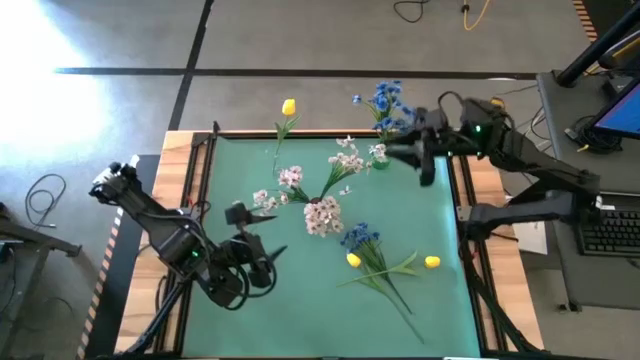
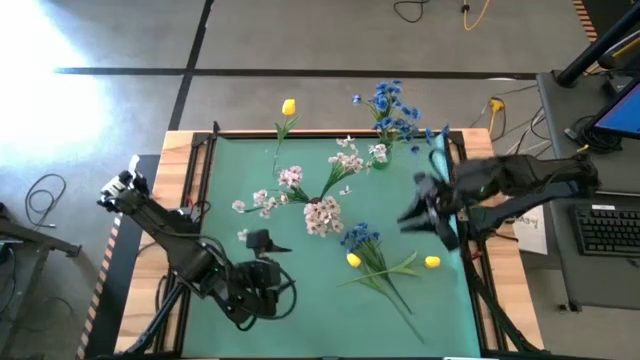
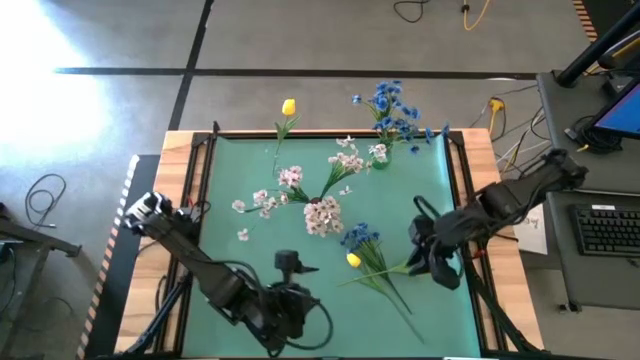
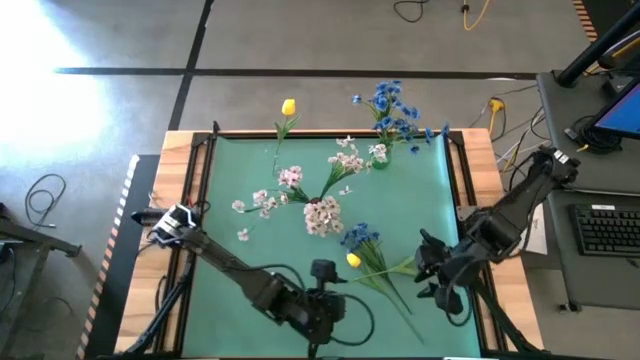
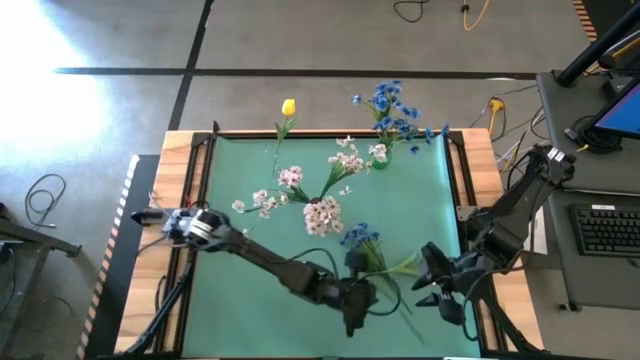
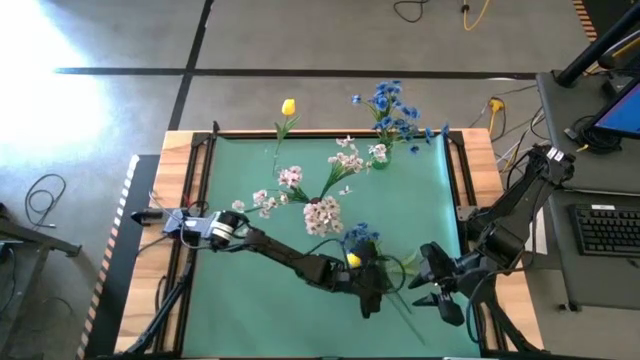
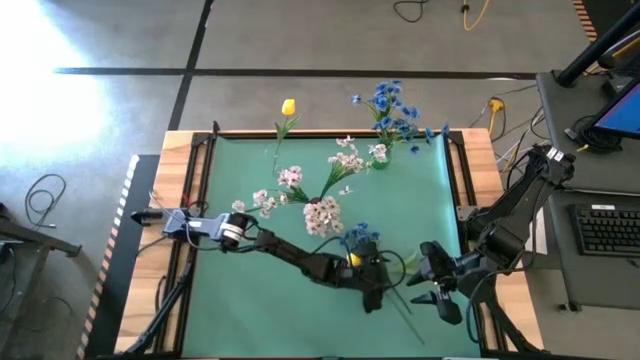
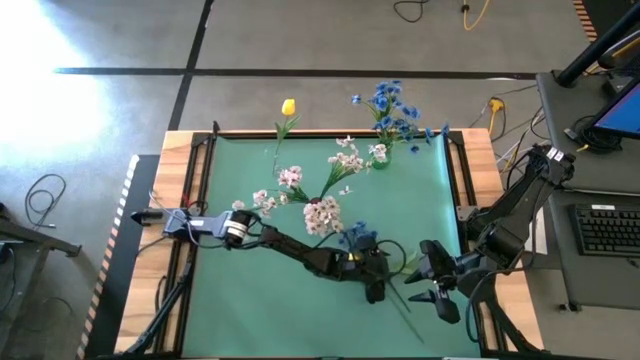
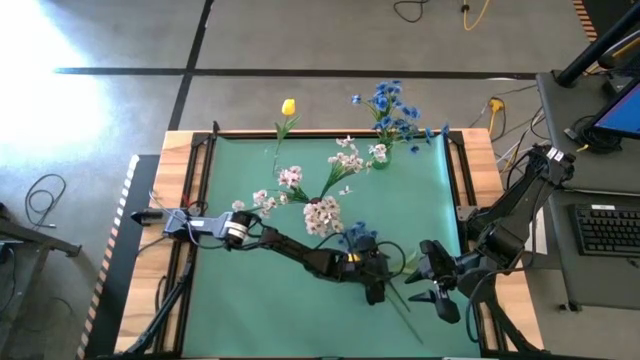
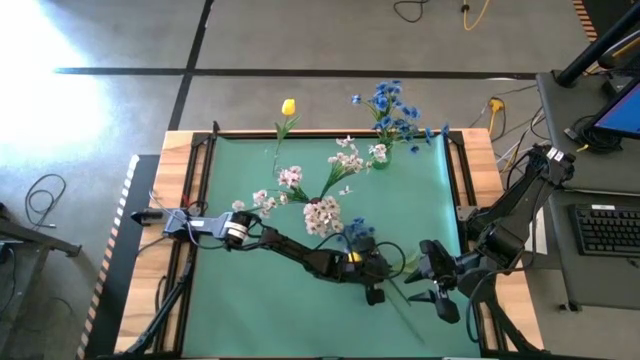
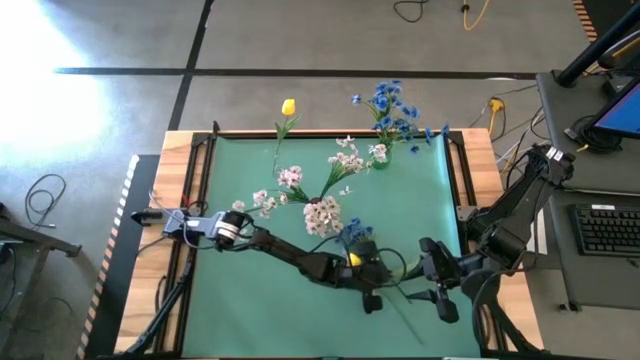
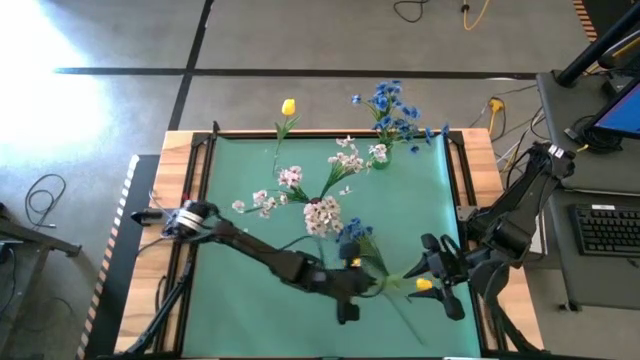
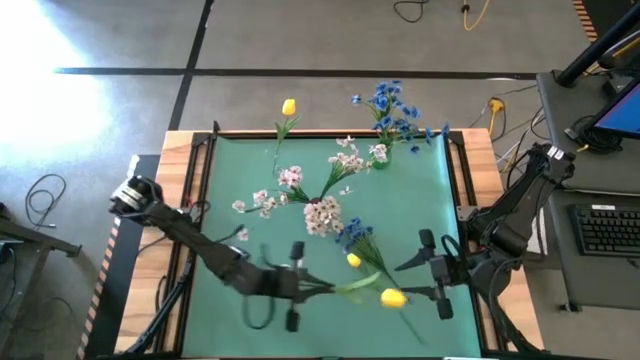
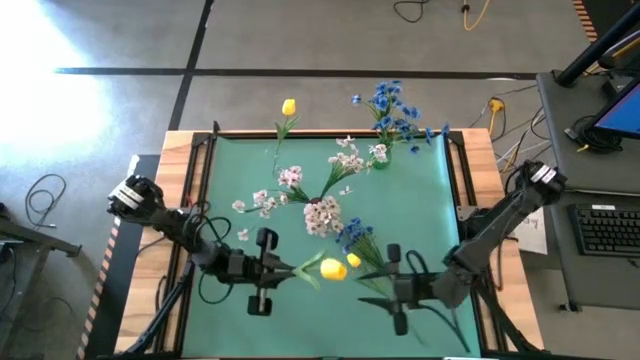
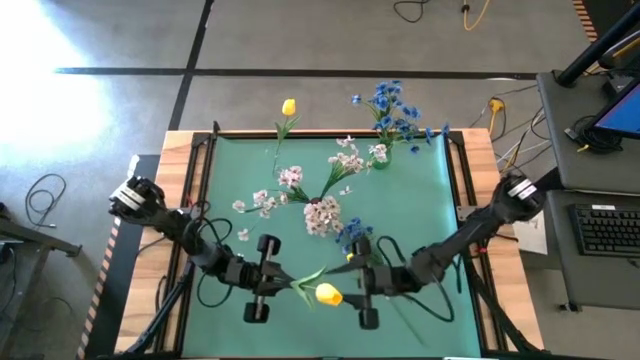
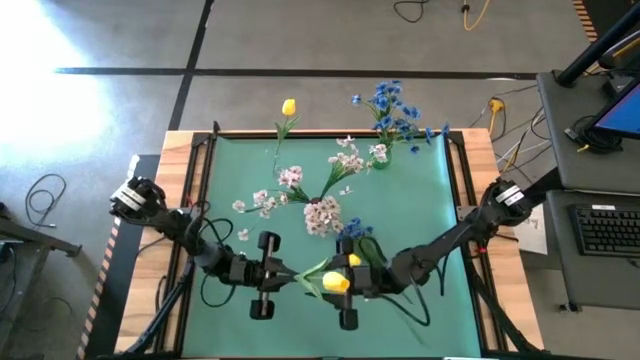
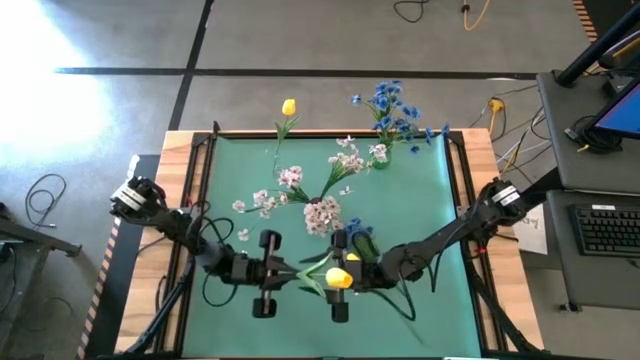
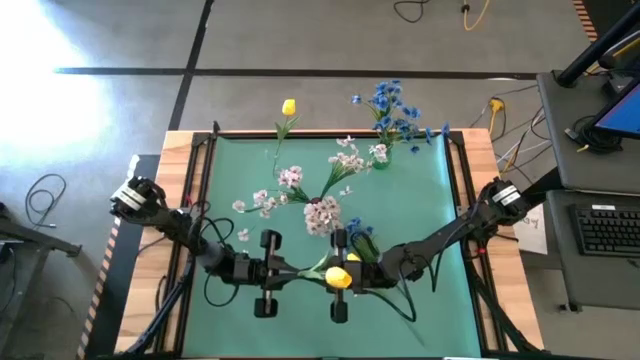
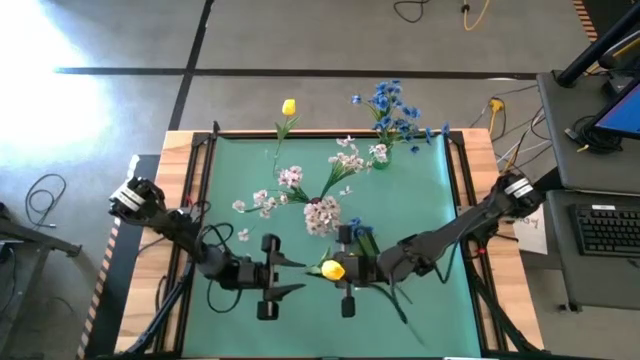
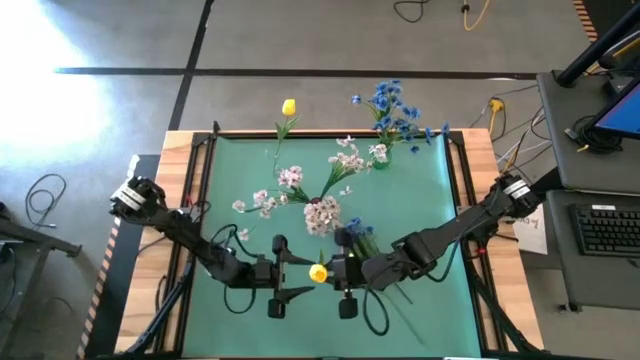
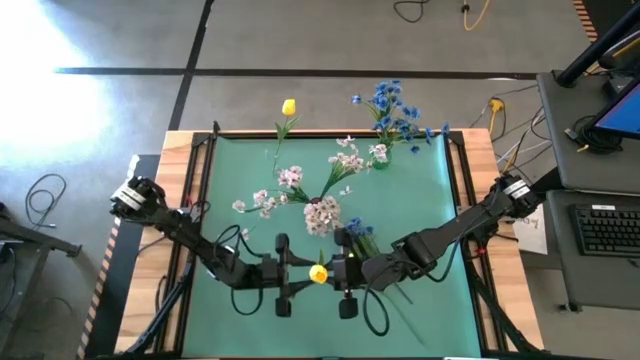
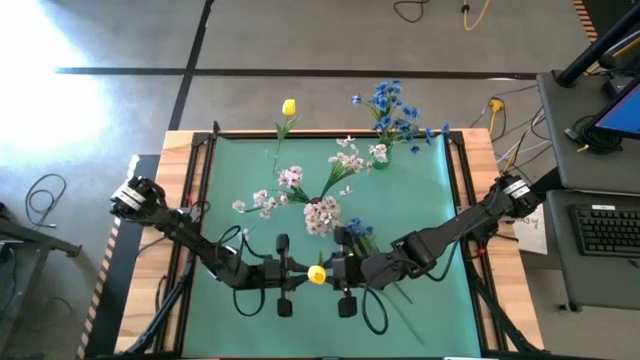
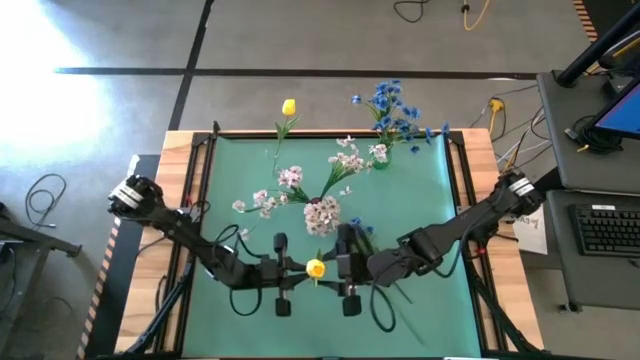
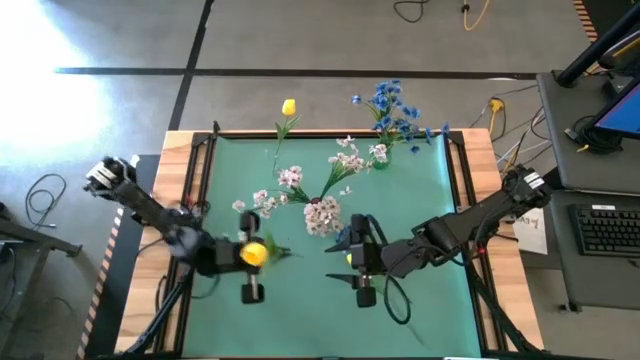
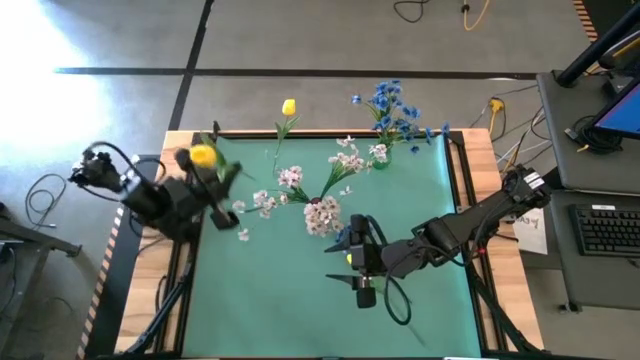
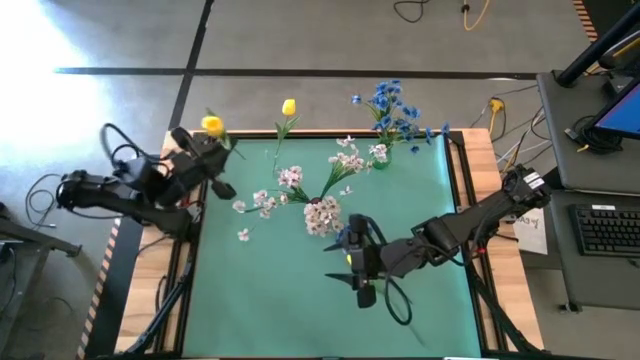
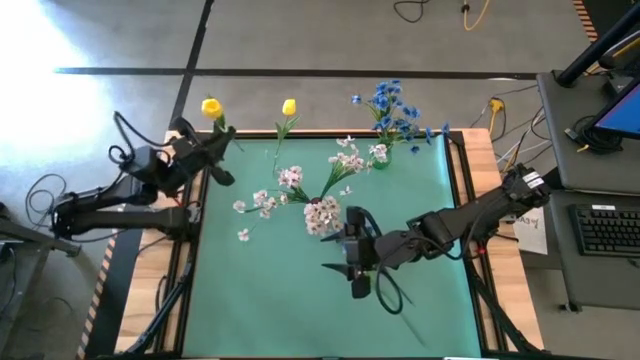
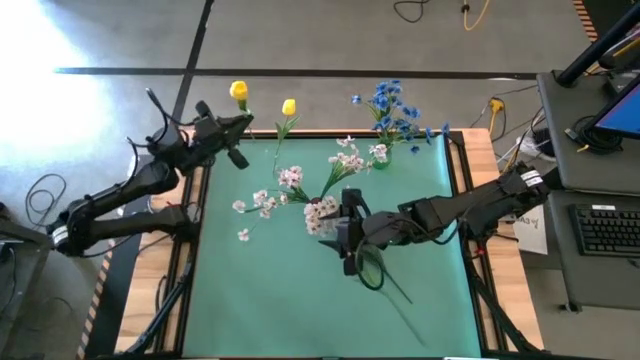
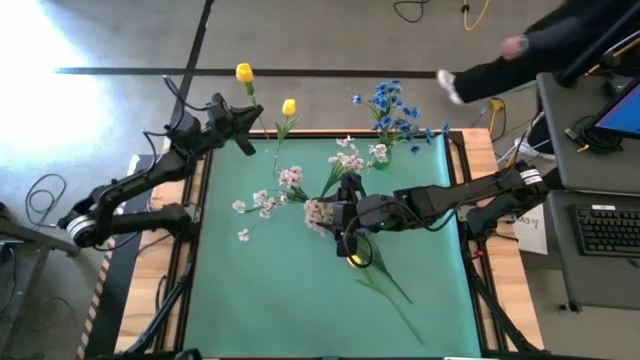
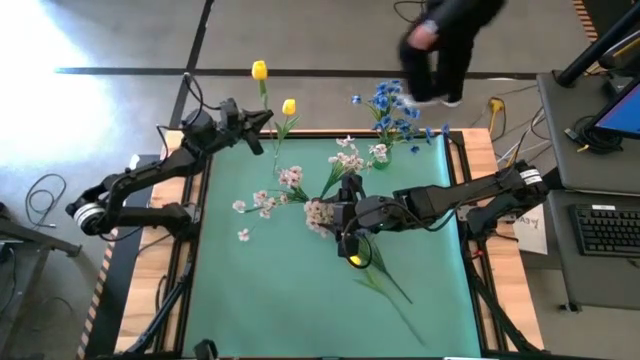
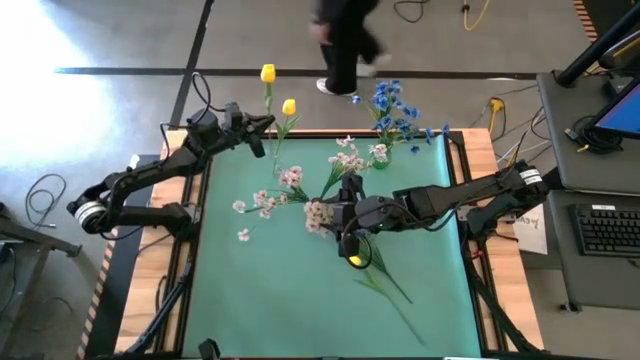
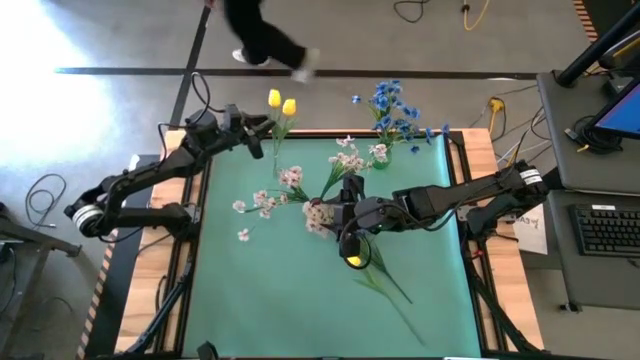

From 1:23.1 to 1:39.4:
Task: Sort flowers into vase by color
Put the yellow tulip into the transparent vase
